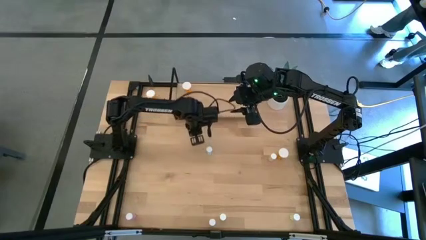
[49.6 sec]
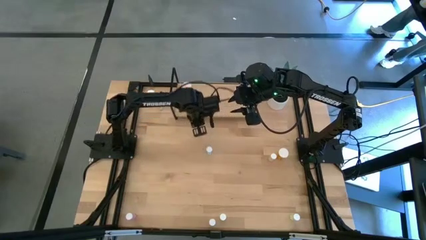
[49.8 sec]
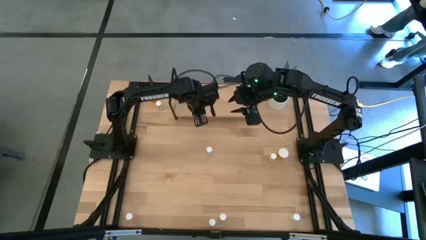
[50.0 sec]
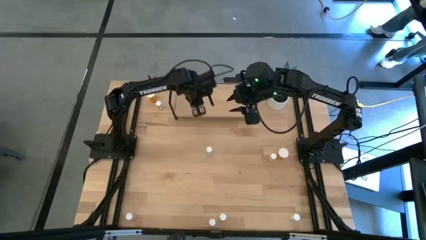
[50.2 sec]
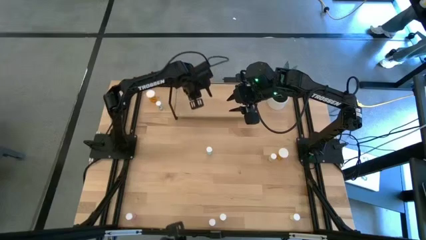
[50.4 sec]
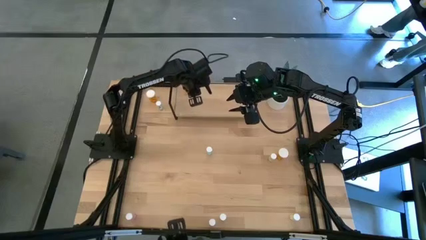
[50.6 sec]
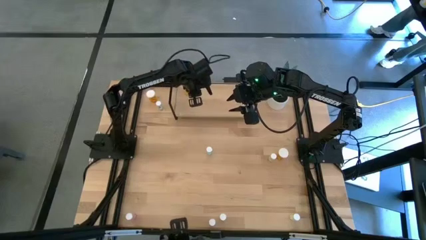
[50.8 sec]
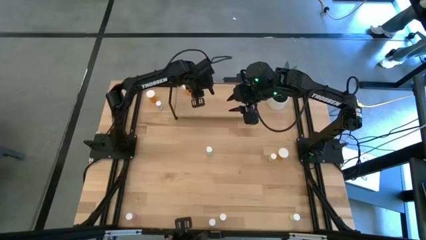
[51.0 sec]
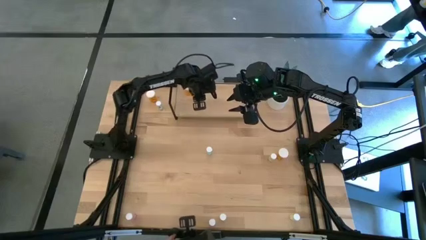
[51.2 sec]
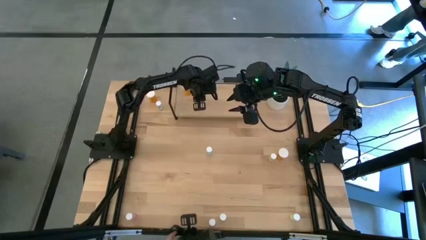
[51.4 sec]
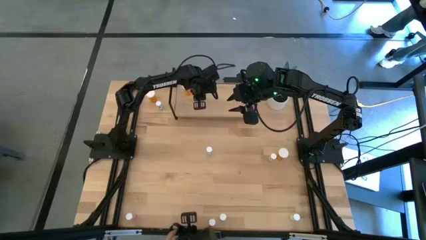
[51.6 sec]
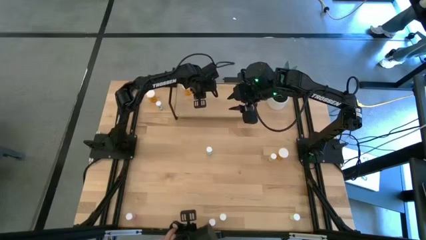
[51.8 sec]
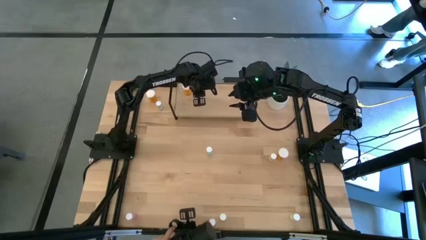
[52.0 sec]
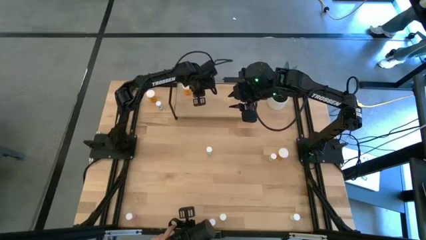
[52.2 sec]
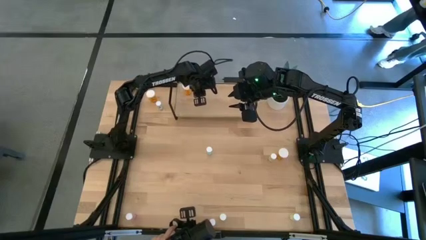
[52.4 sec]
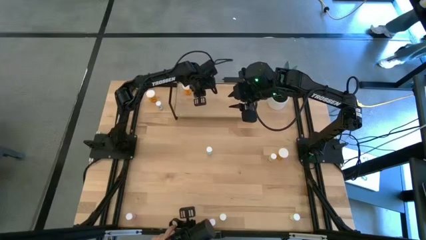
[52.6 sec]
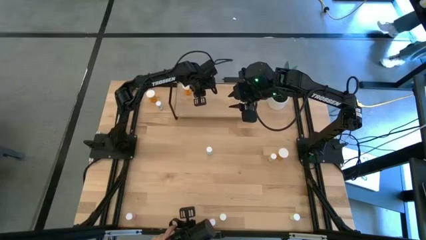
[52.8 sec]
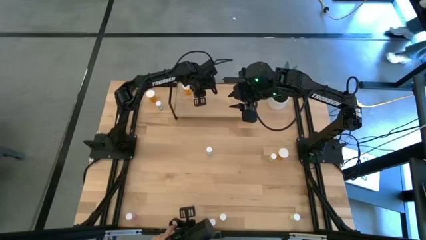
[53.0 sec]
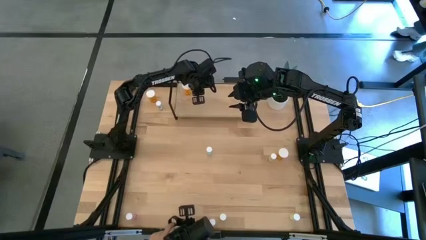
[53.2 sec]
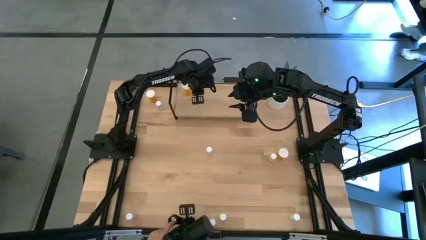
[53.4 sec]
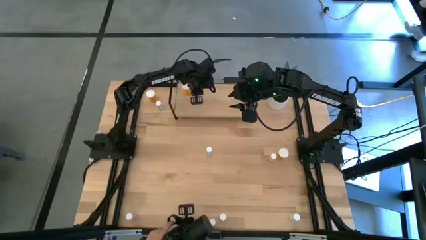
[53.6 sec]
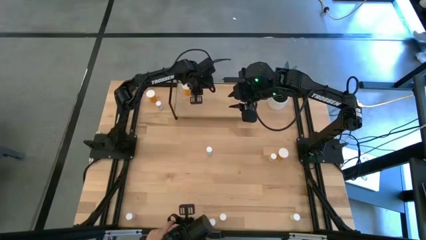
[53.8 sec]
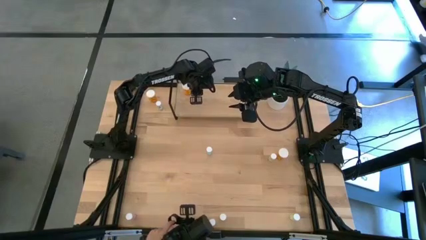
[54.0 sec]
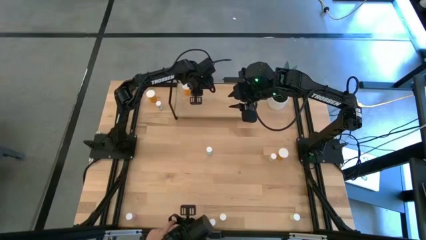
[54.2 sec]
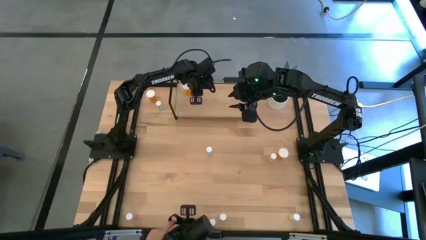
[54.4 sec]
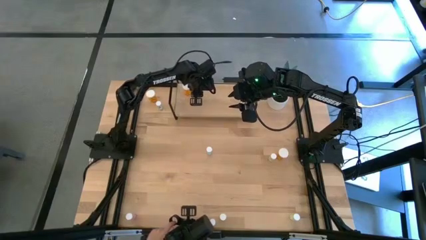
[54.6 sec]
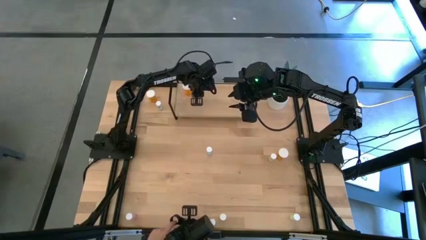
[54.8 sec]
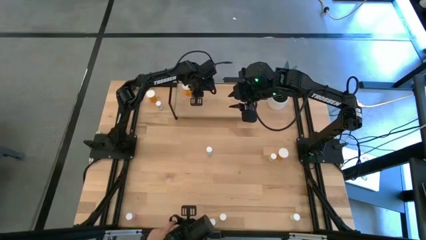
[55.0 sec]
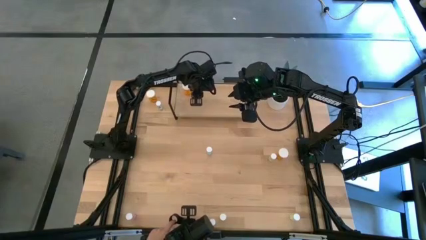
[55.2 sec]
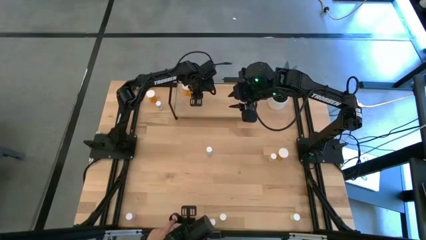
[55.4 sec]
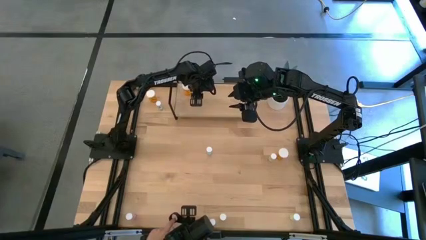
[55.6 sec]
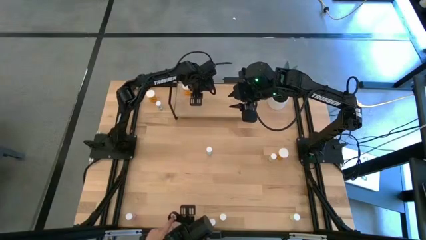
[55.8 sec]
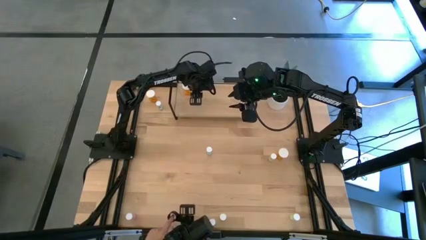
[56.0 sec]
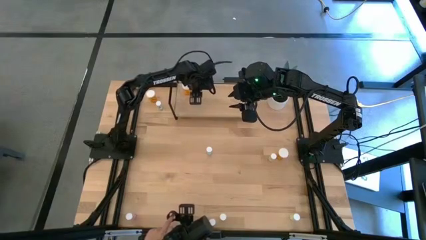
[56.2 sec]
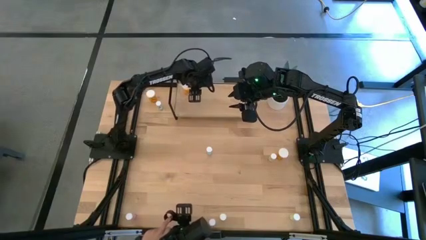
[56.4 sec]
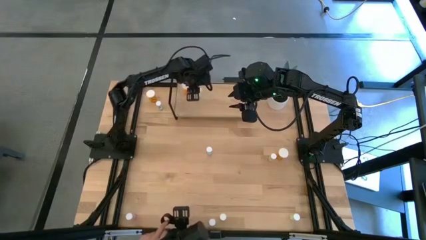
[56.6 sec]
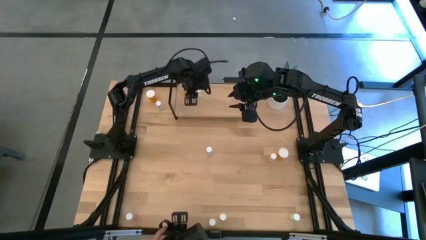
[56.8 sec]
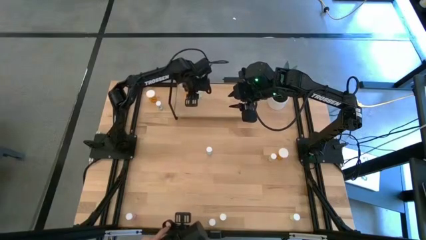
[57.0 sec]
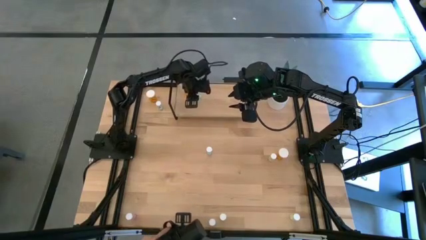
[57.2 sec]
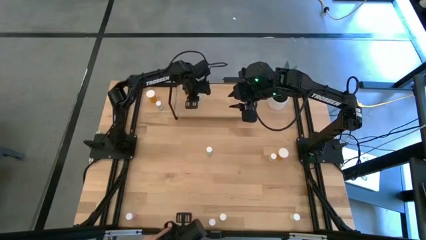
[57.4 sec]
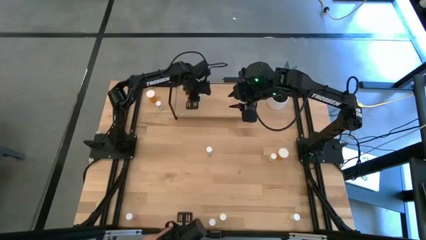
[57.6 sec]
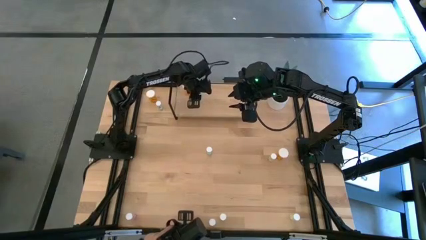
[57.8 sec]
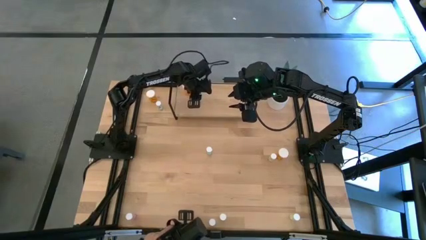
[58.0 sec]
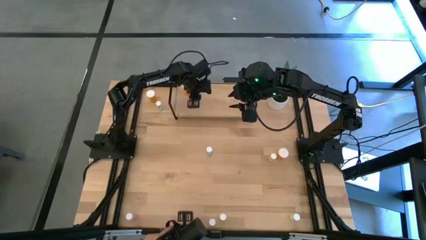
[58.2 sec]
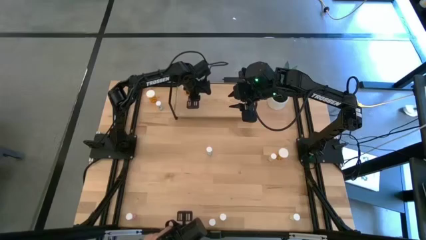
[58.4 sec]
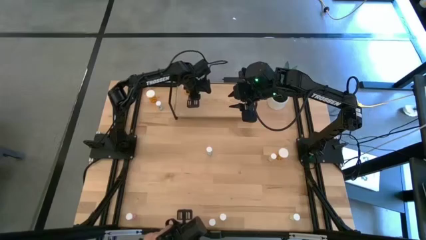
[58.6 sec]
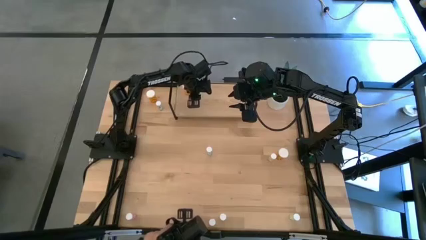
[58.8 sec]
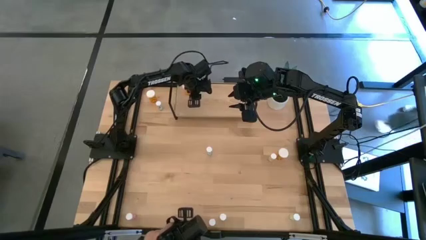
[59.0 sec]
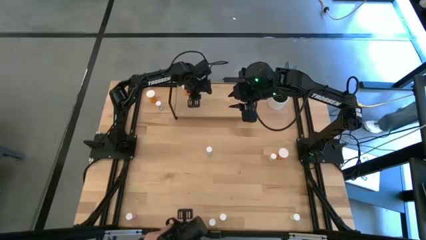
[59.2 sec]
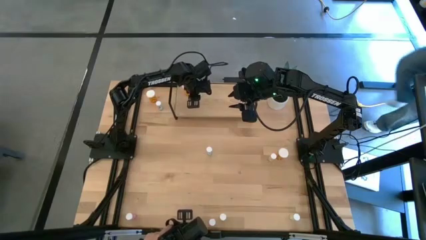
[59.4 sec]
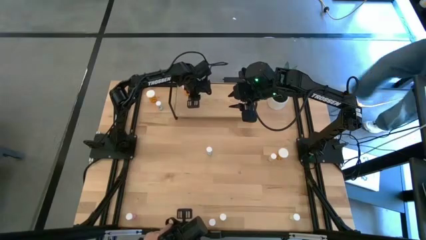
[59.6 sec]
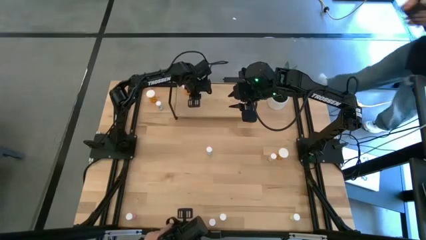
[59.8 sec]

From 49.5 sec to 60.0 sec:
Task: Pick and place medicine bottles onto shelf by color
Put the bottom right blue pill bottle on the shelf
